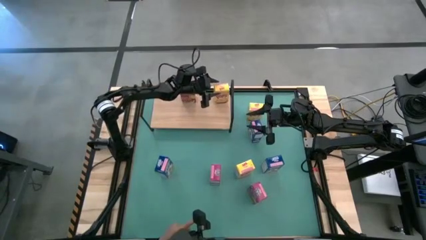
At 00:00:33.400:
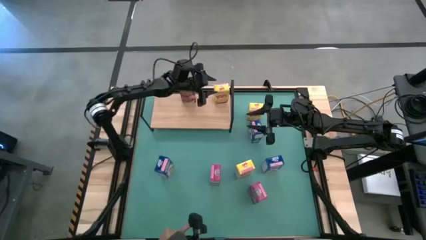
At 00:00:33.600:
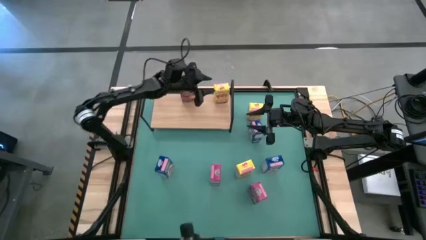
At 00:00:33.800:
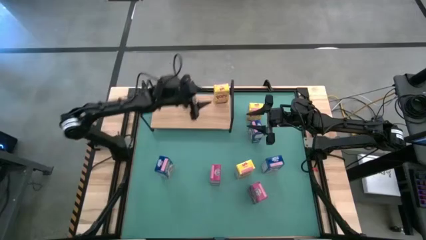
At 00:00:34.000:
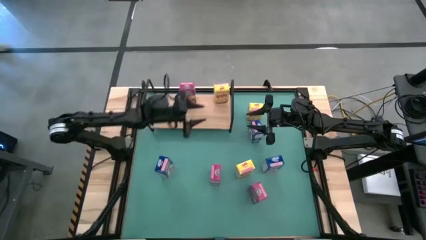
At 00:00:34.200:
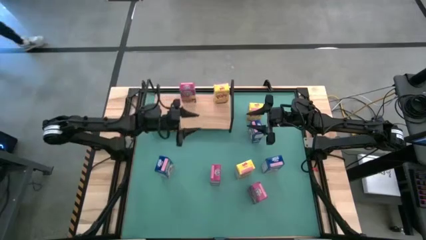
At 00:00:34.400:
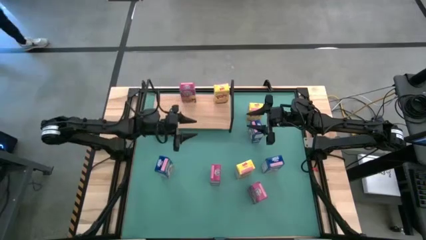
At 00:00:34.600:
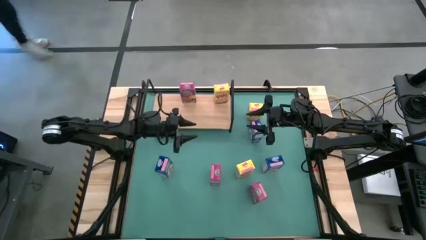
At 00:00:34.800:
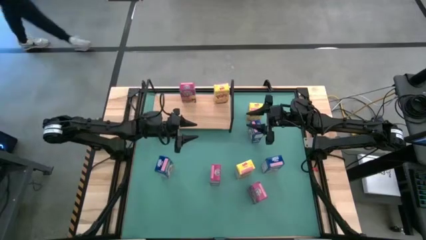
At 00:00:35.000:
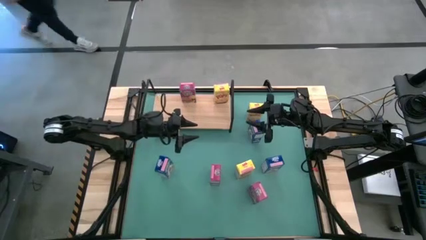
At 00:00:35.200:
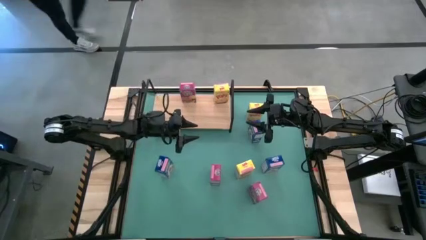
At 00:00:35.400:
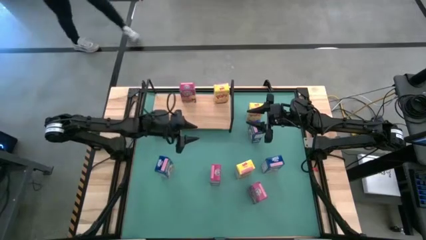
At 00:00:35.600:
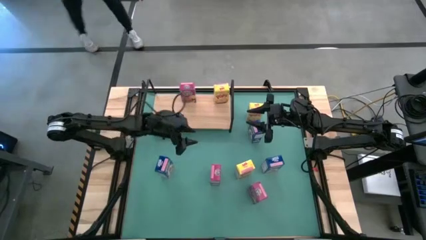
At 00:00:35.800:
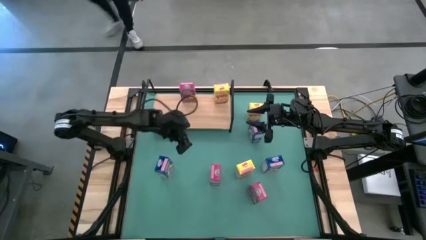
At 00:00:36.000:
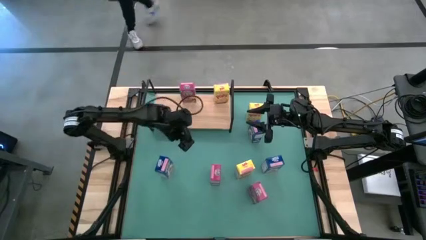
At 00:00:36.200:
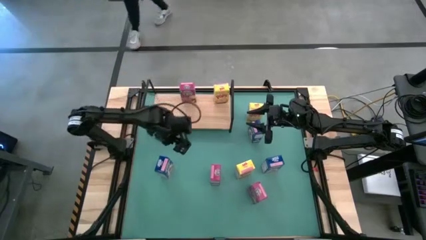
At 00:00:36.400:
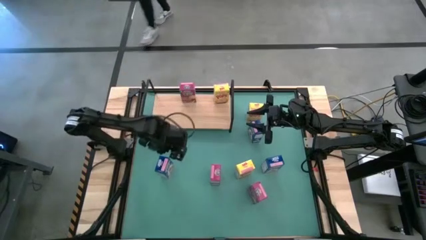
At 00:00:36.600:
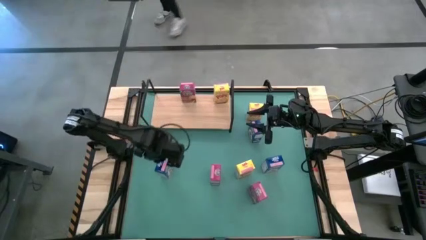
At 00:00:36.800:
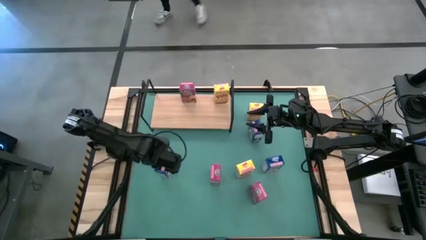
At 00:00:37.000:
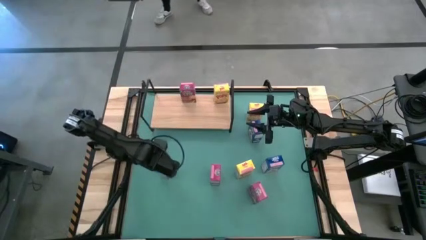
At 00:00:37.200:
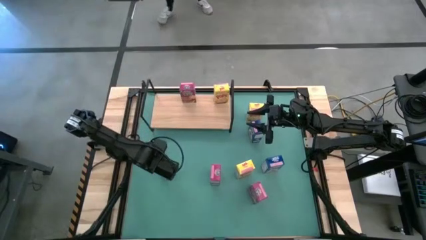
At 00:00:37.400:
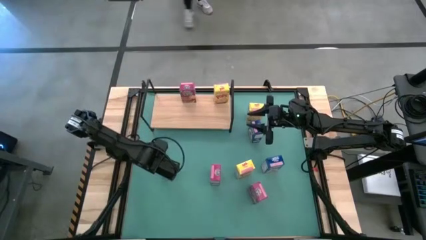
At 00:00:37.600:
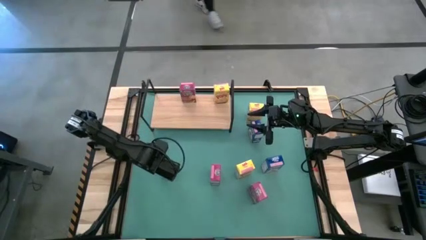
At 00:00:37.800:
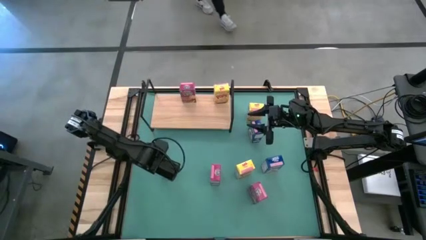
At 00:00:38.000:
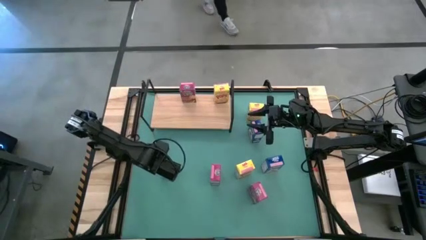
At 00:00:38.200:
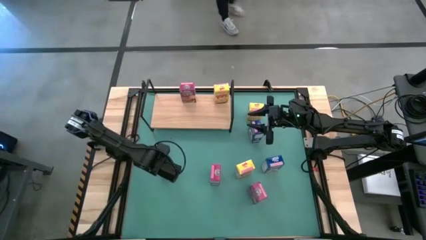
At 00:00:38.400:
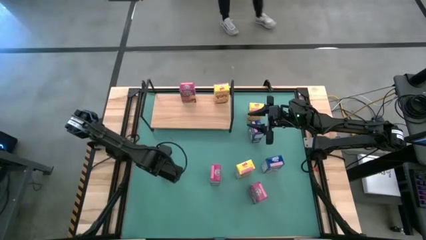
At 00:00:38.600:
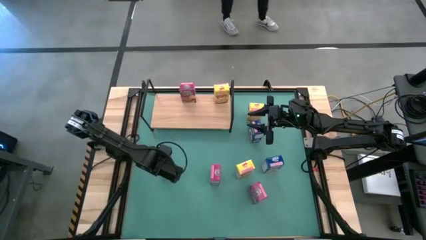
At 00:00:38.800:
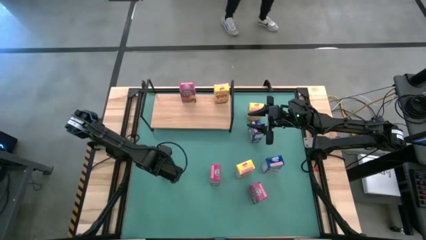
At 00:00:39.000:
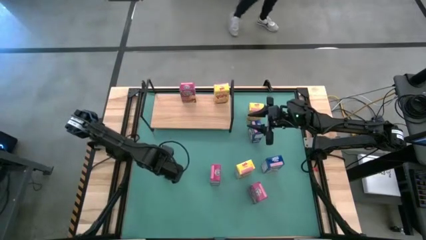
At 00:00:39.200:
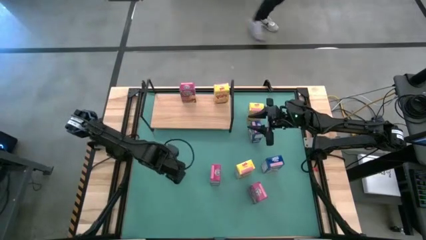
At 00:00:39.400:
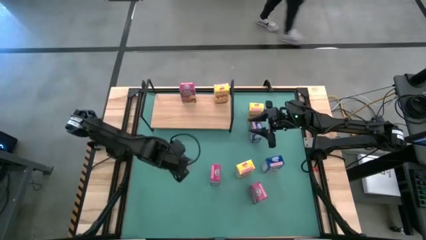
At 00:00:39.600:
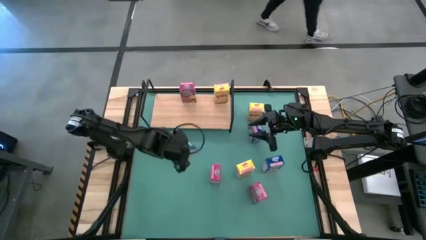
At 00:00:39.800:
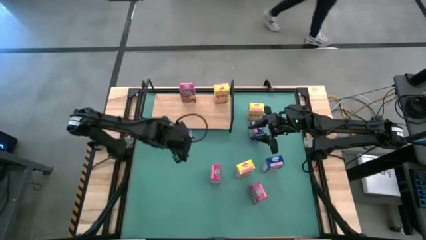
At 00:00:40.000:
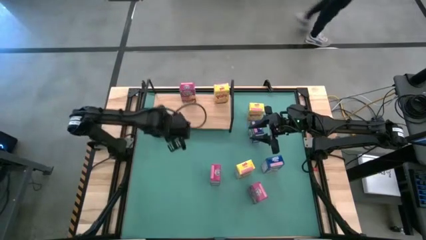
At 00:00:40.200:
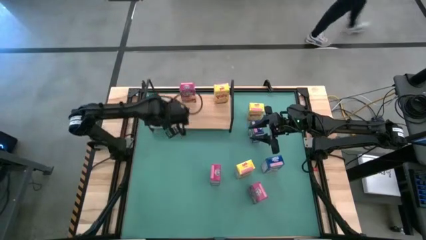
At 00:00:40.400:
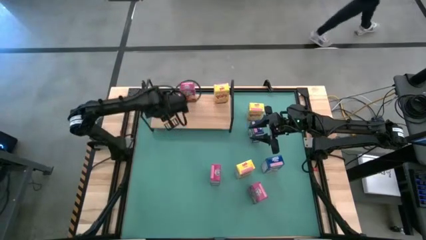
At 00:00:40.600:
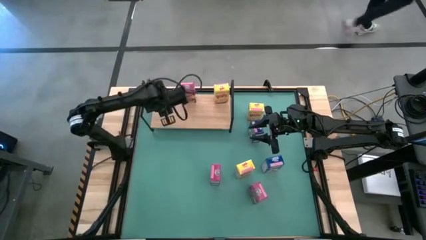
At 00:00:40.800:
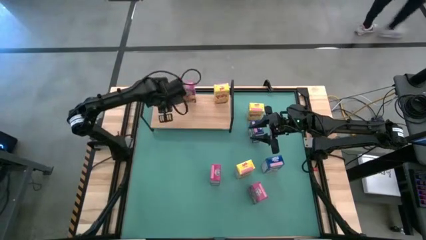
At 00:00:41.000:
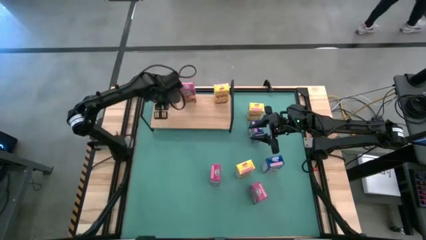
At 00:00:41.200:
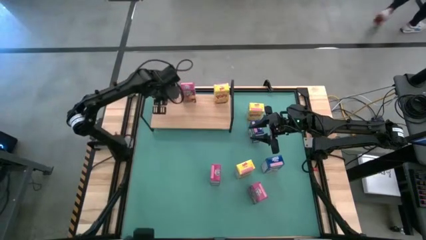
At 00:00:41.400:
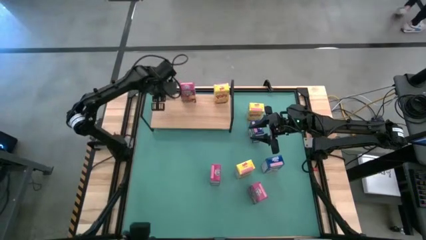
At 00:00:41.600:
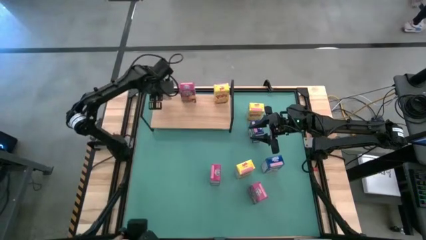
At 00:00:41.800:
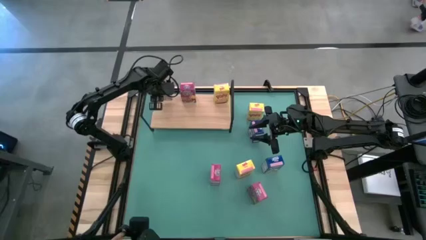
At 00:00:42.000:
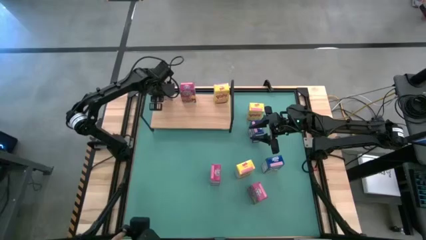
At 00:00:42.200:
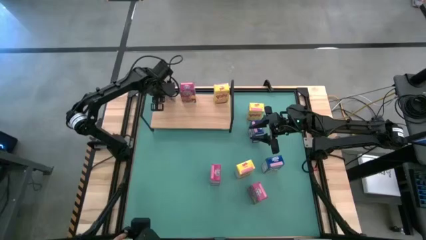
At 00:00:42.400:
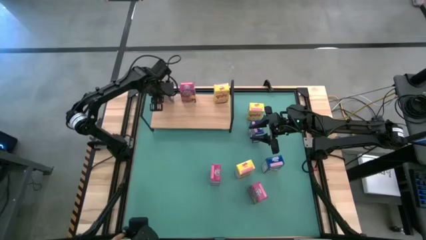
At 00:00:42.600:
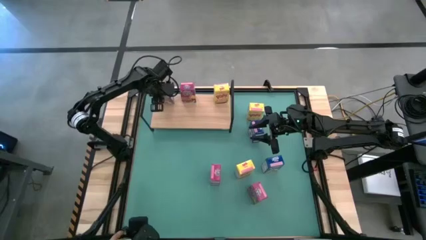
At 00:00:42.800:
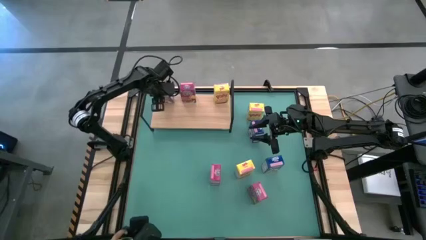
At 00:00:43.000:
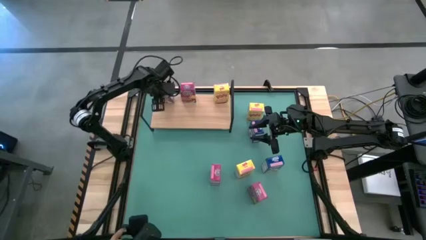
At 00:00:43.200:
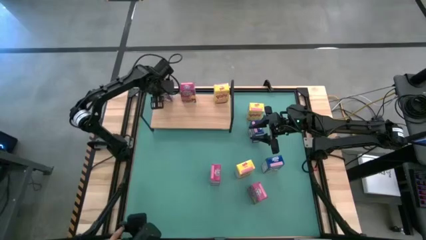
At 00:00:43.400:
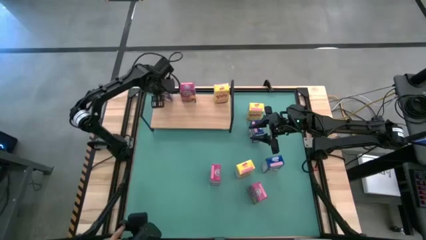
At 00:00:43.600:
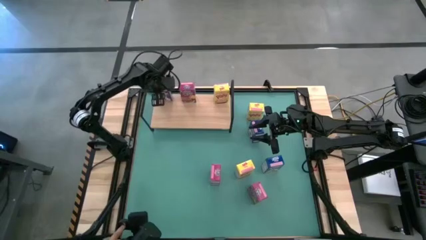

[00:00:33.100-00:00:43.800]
Task: Stack cereal on shelf
Put the bottom left blue cereal box on the shelf
